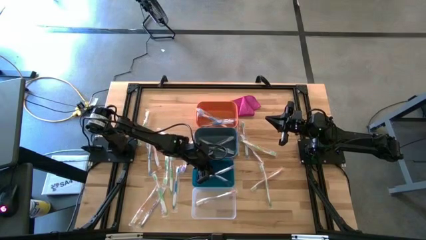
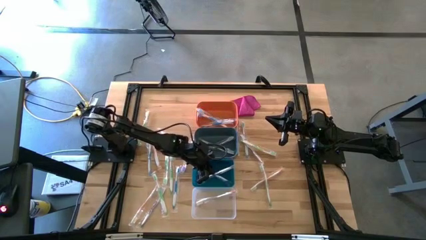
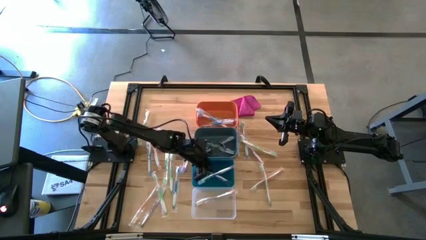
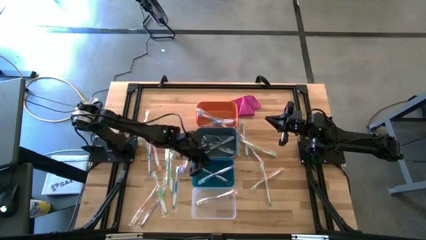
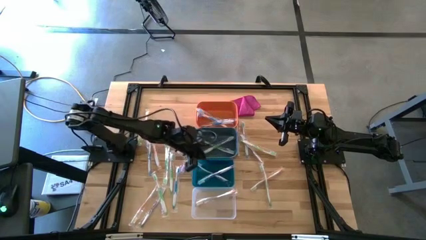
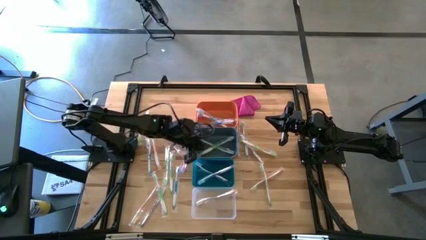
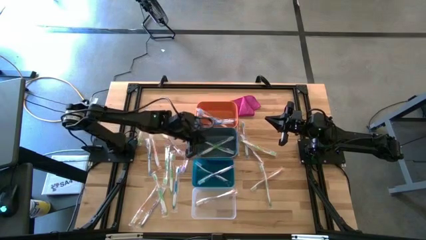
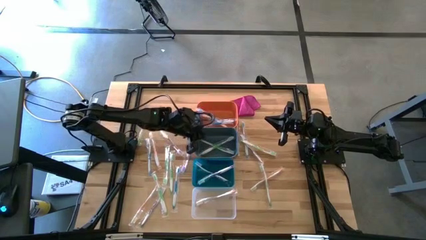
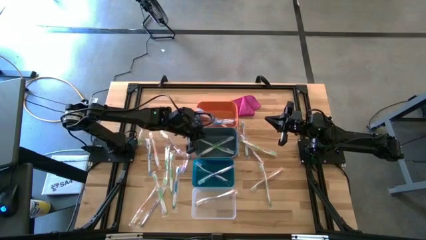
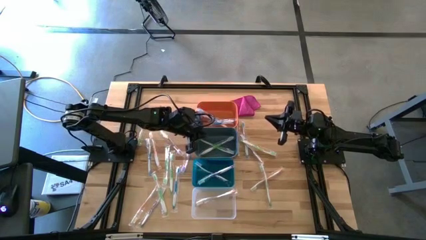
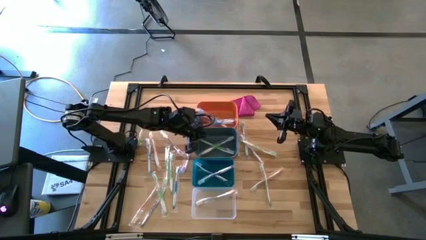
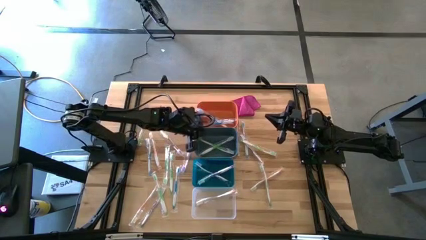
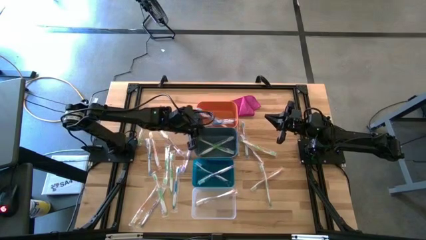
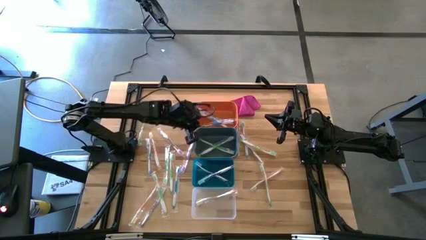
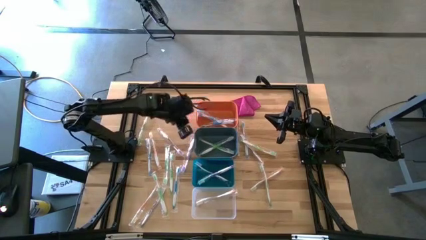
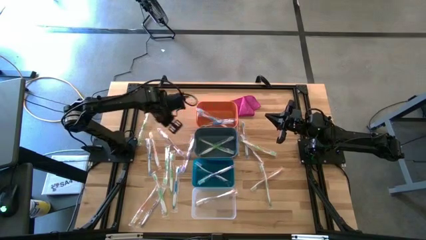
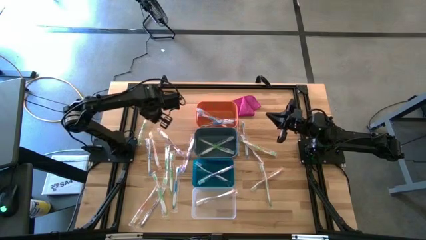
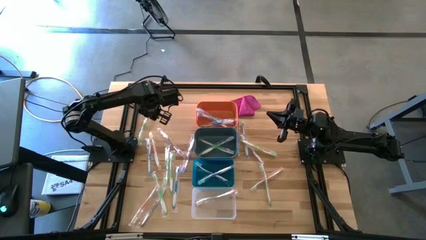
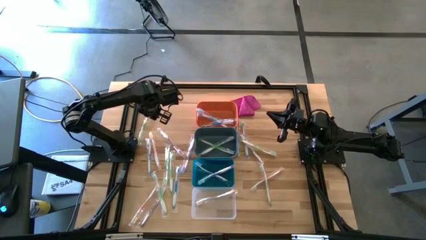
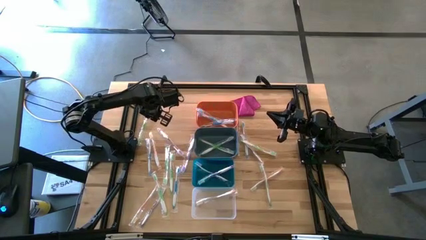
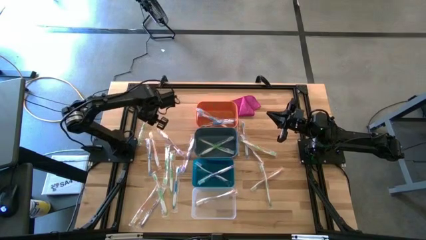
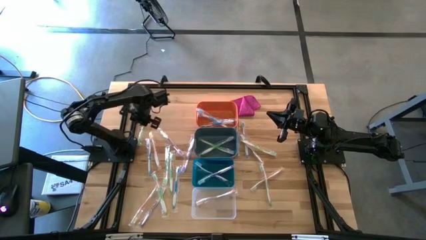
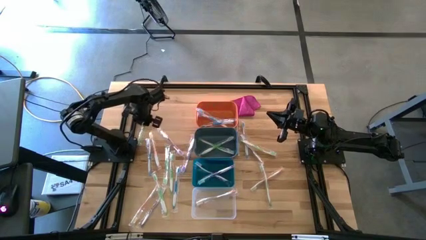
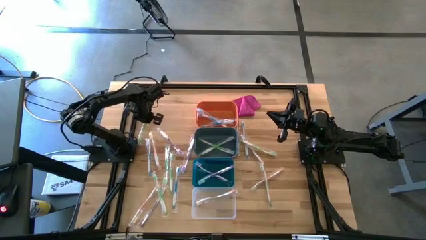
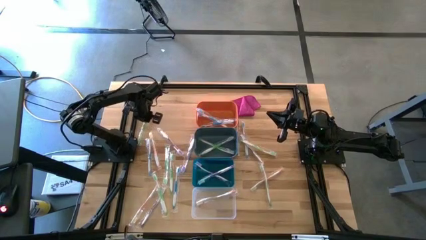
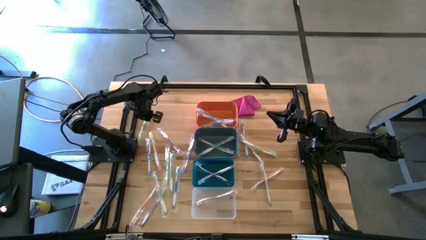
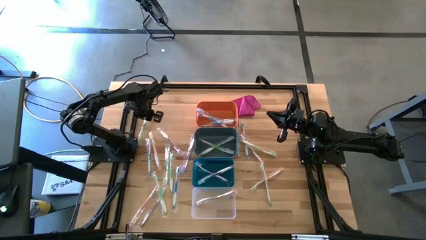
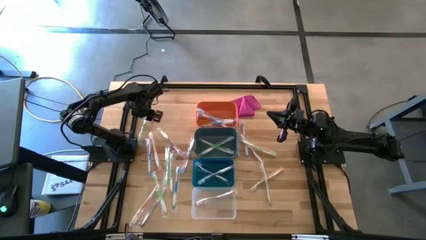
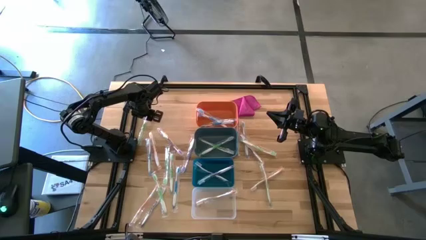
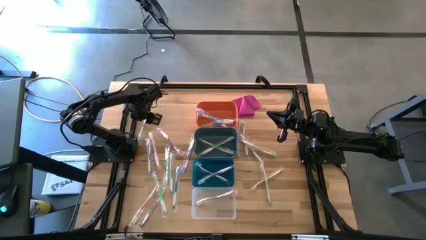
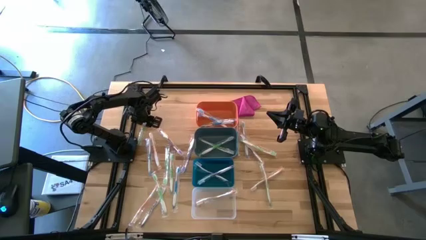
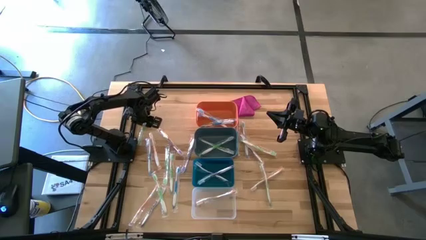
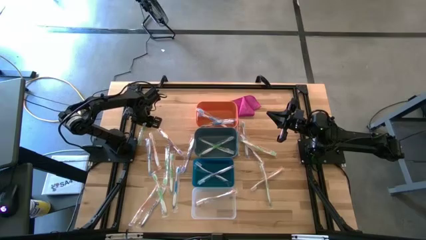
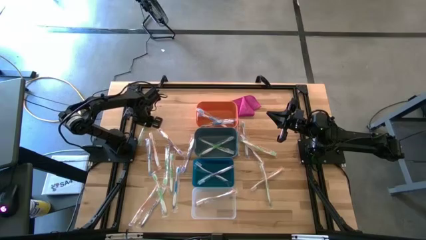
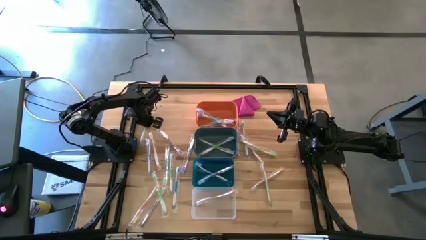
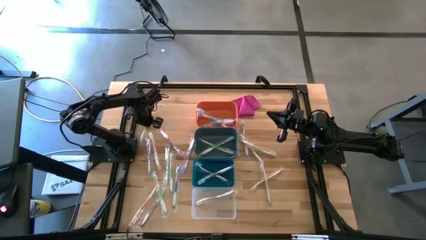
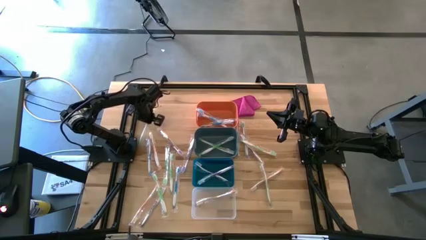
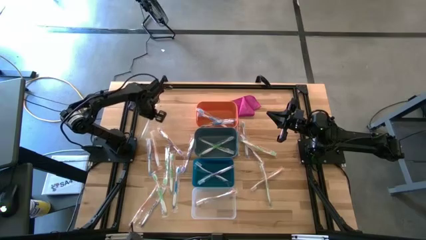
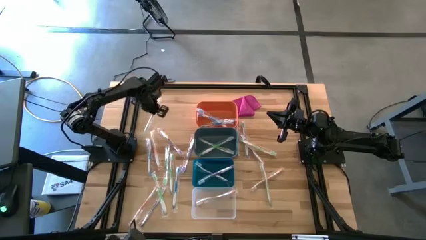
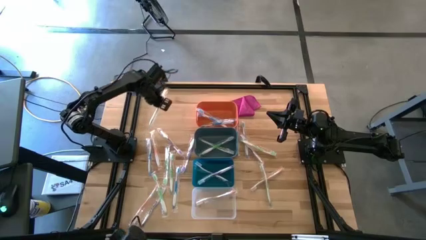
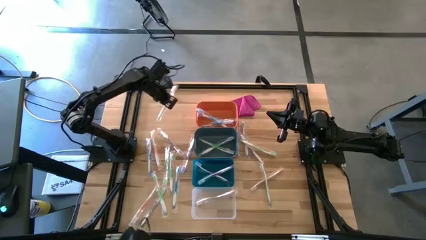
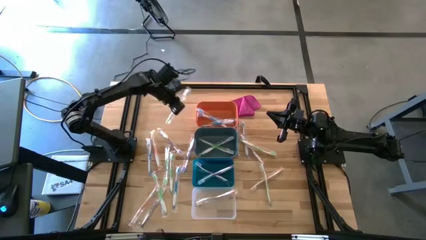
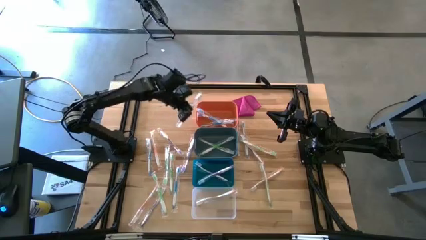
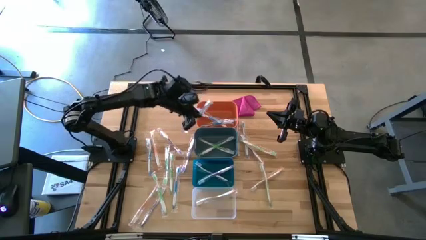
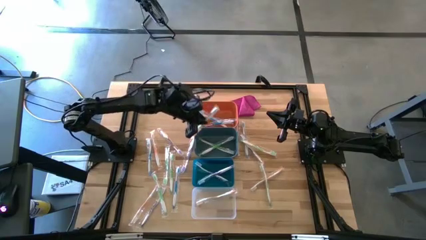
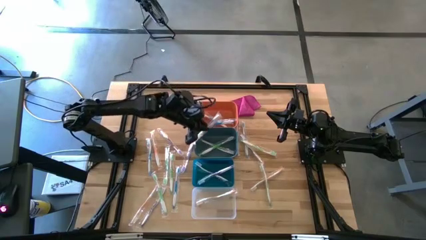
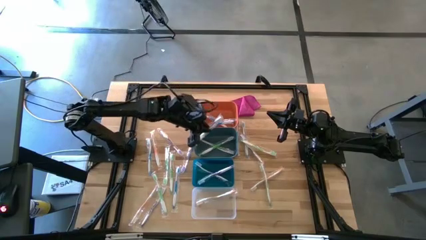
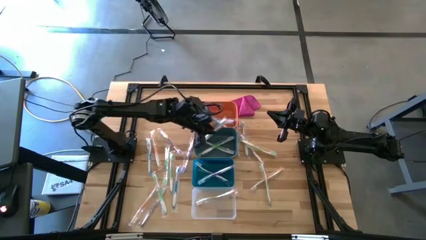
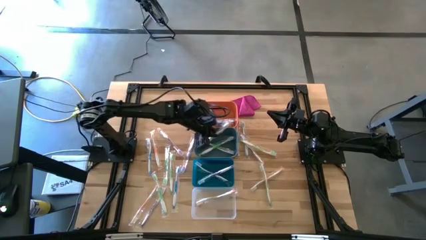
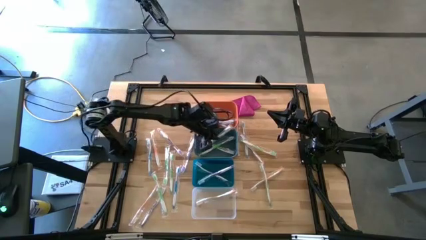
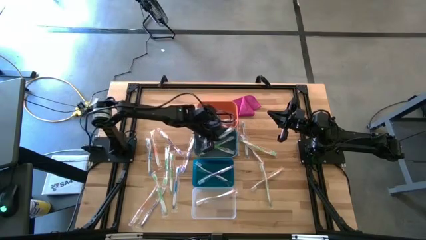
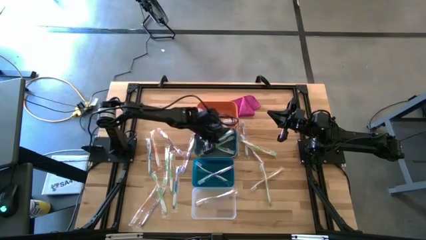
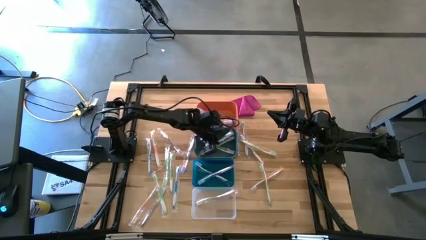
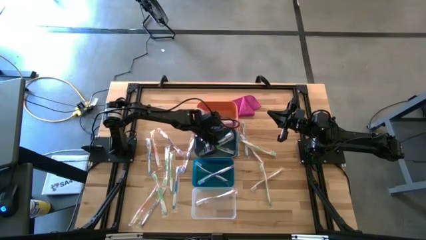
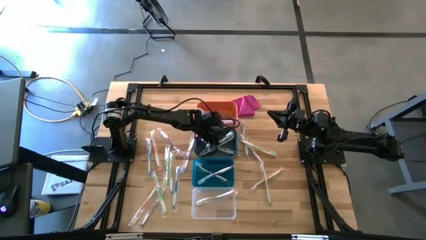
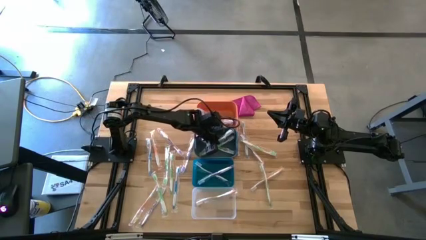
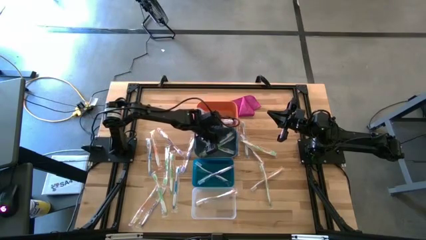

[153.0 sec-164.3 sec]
Task: Pick & Place Toothbrushes
Put the green toothbrush into the green bin

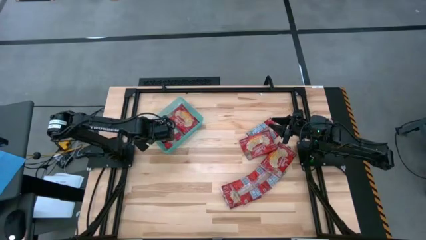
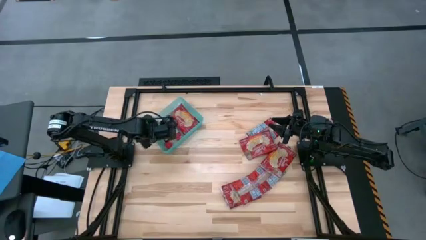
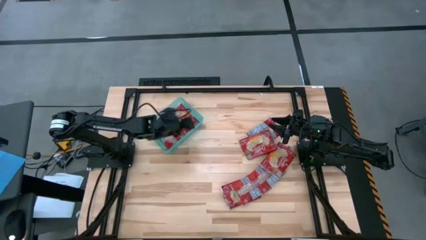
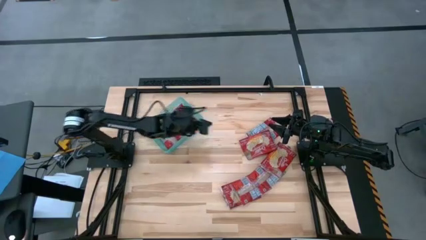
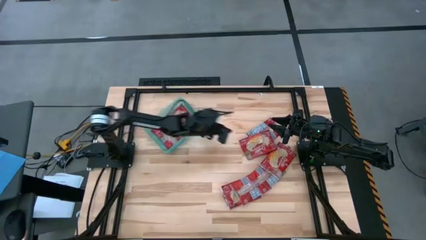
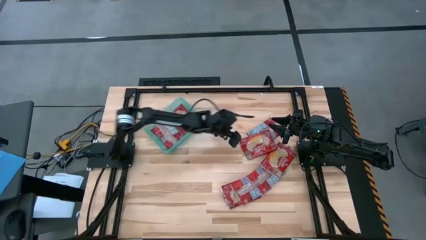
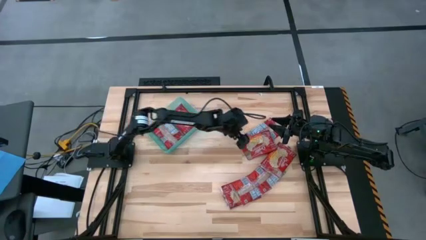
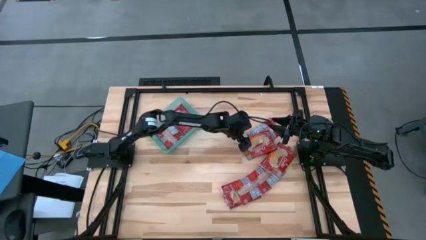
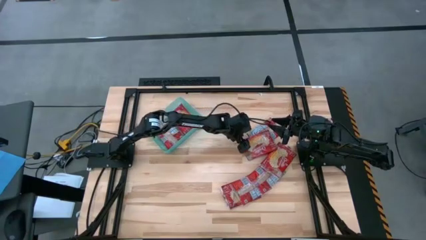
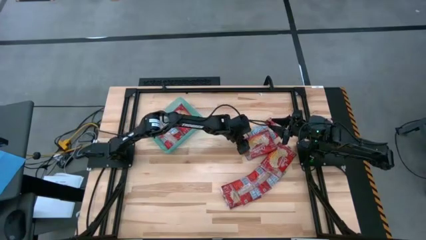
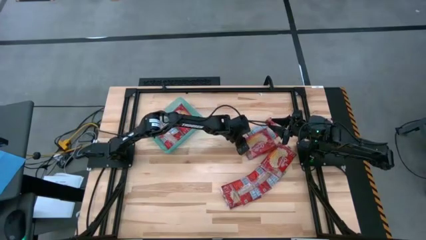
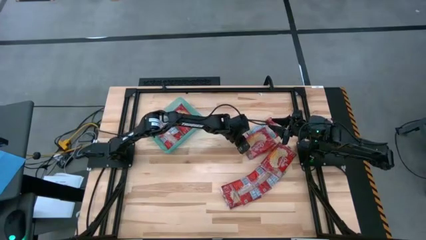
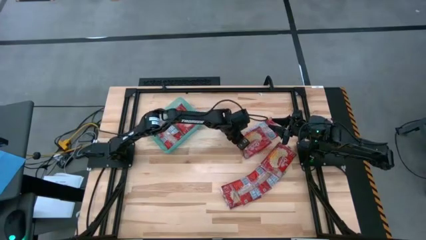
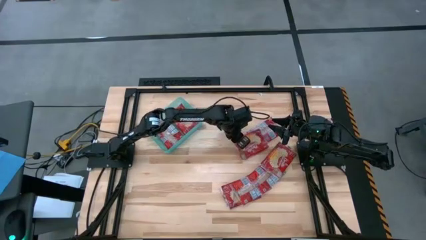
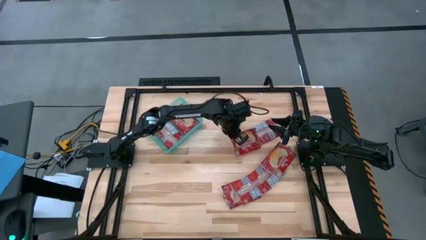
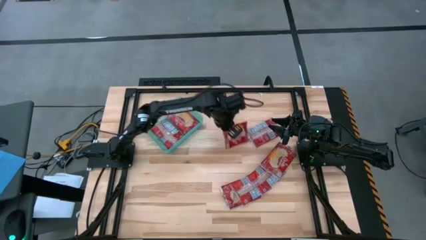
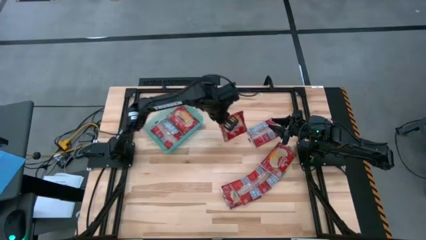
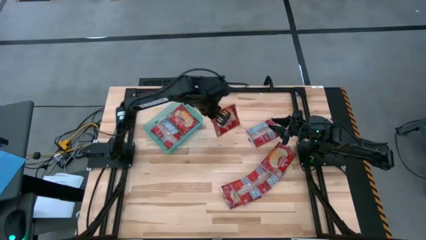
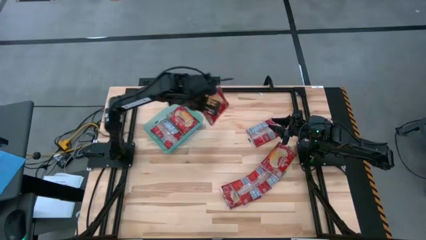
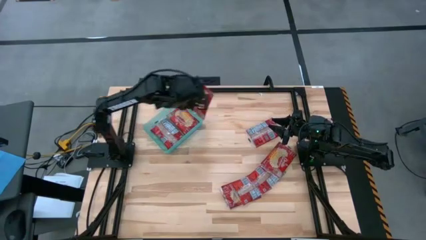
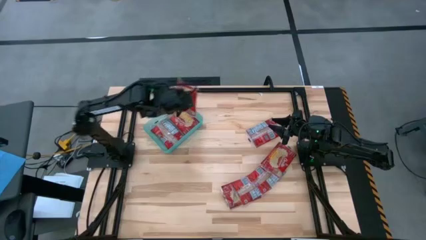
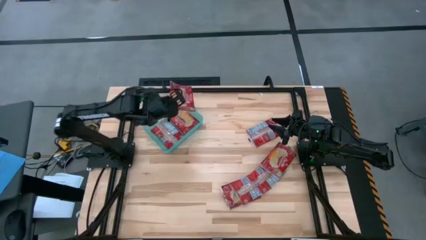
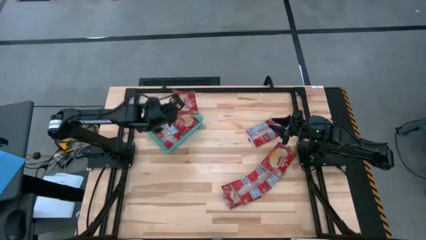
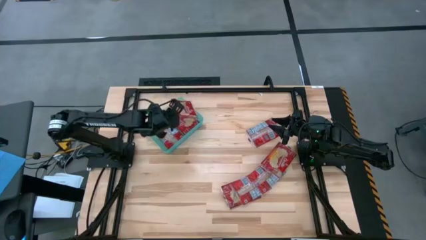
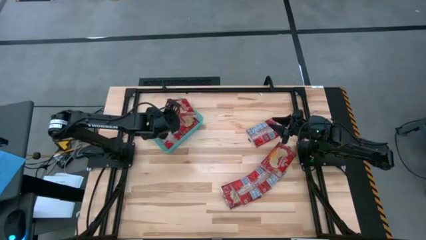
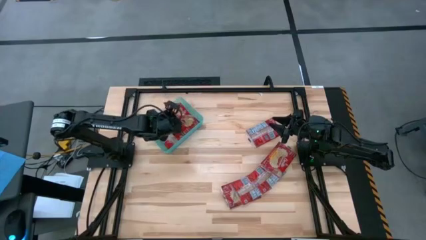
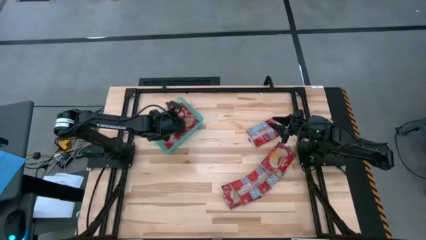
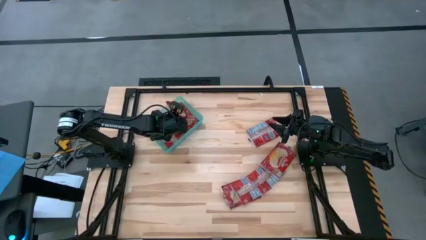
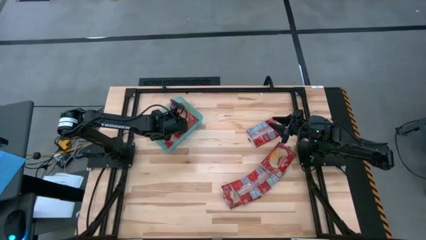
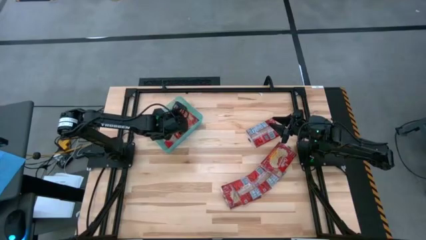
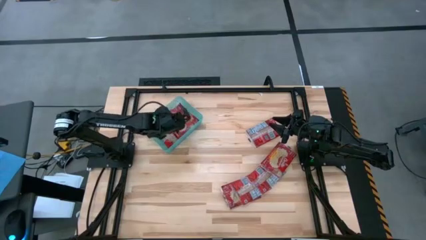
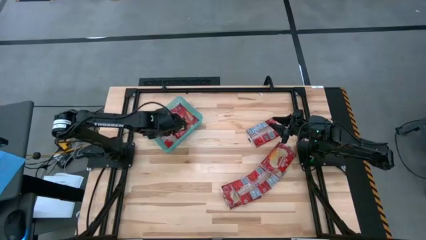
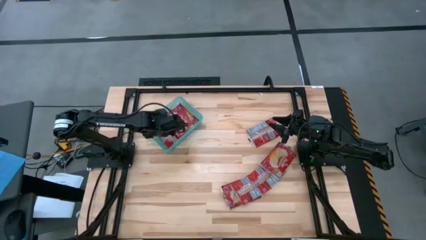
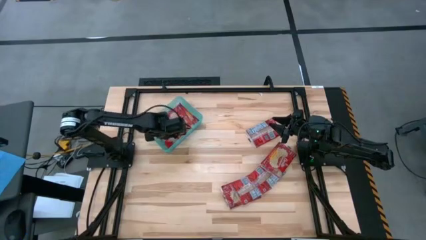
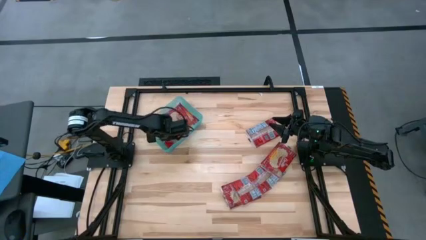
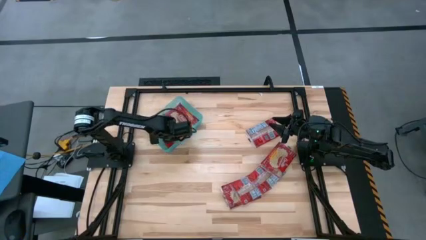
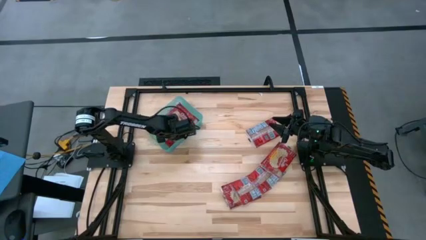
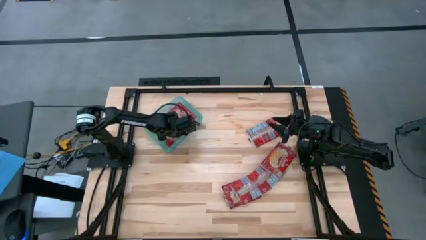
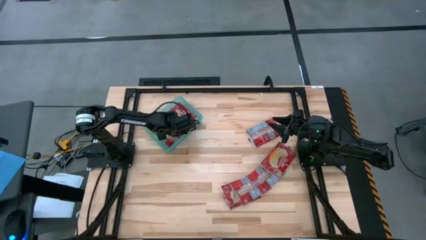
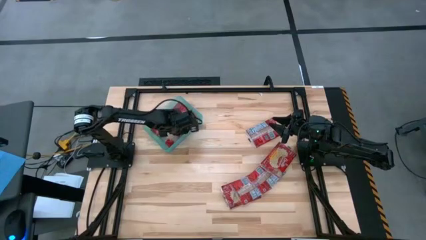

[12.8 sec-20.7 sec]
Task: Sort popcorn bags into baskets
Put the red popcorn bag into the blue bin
